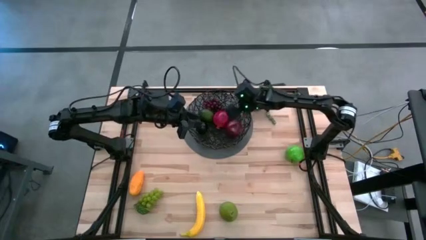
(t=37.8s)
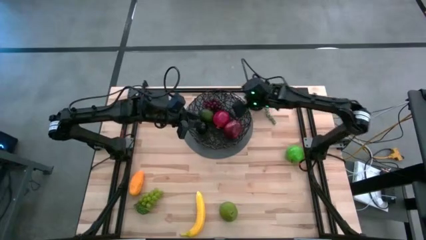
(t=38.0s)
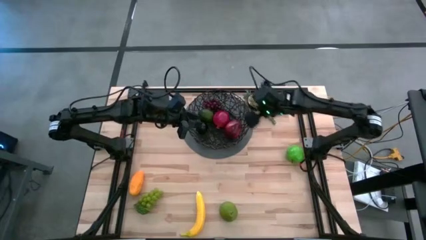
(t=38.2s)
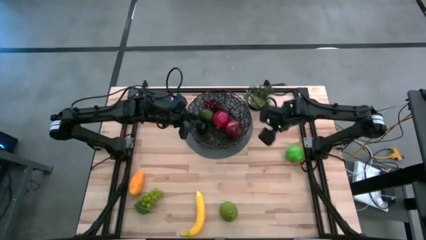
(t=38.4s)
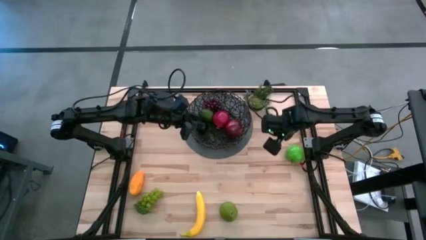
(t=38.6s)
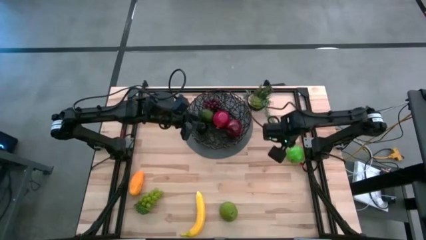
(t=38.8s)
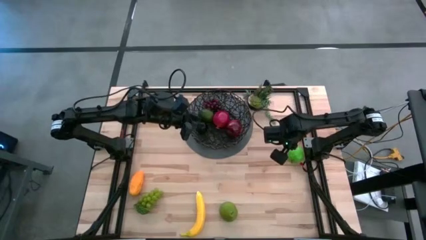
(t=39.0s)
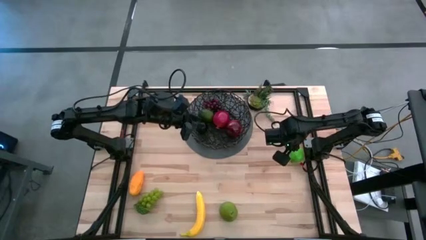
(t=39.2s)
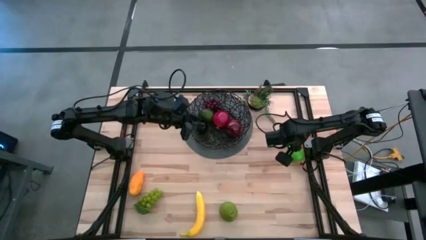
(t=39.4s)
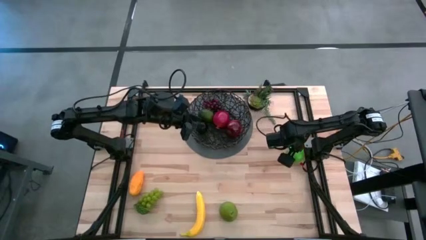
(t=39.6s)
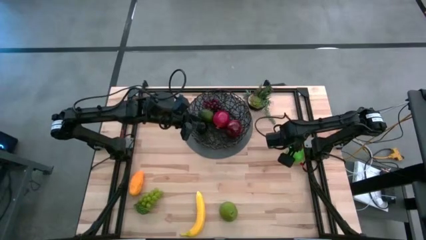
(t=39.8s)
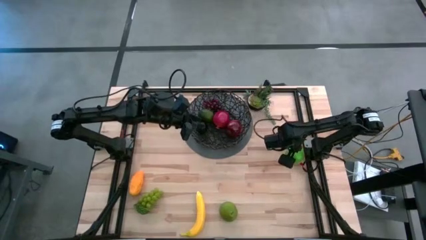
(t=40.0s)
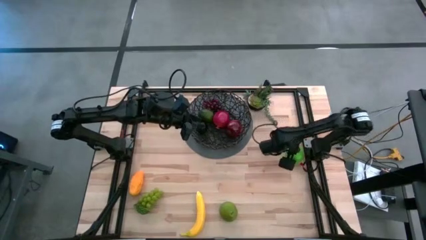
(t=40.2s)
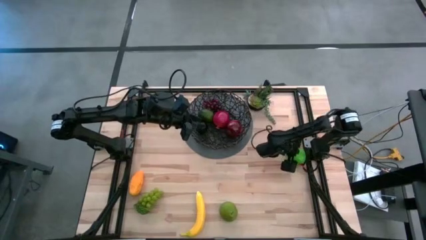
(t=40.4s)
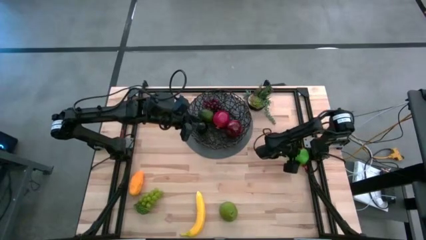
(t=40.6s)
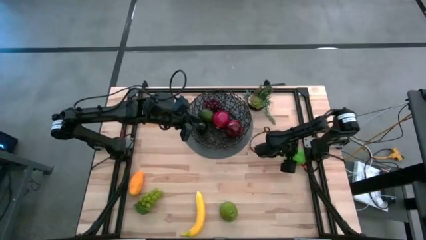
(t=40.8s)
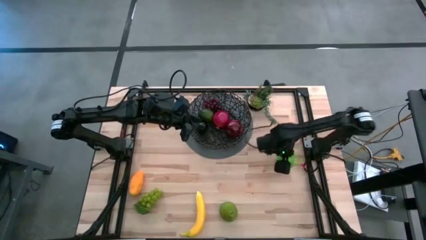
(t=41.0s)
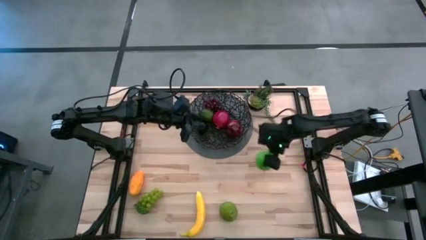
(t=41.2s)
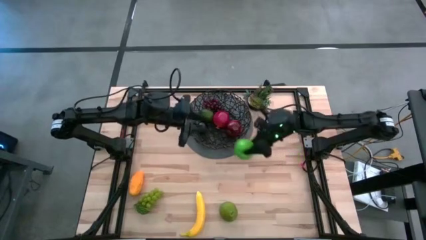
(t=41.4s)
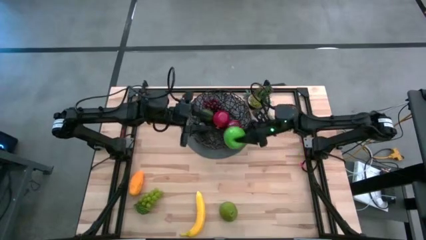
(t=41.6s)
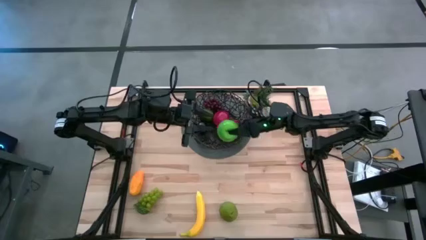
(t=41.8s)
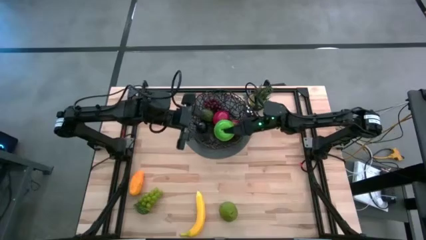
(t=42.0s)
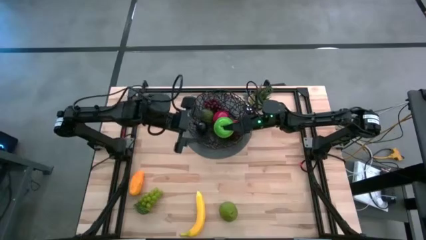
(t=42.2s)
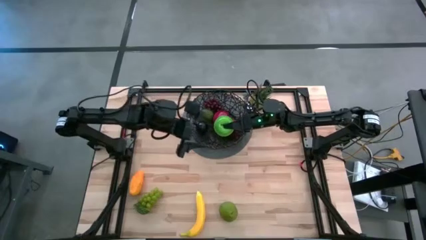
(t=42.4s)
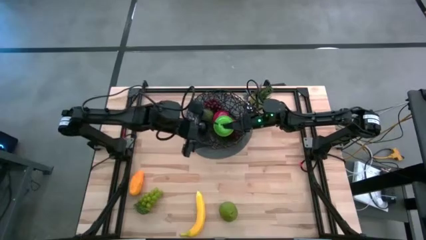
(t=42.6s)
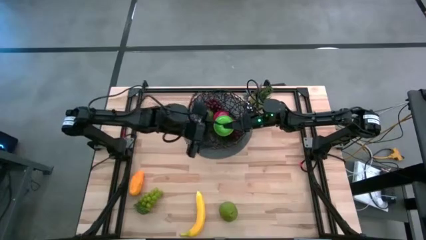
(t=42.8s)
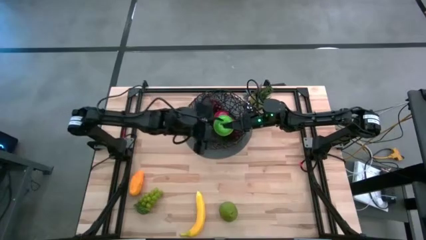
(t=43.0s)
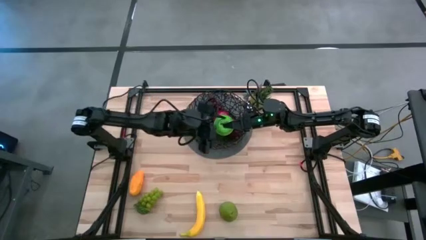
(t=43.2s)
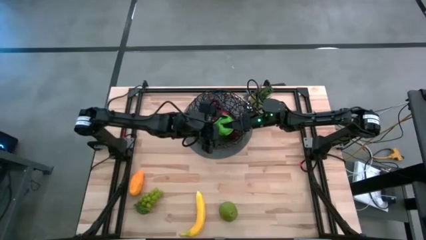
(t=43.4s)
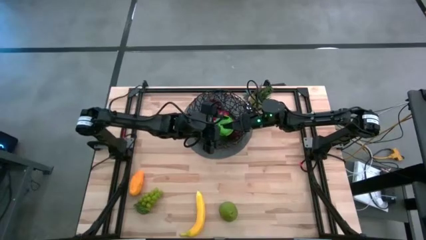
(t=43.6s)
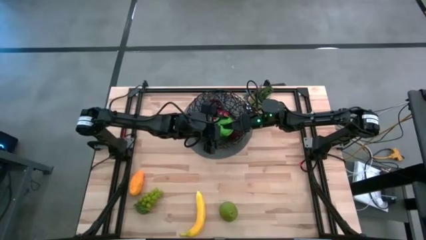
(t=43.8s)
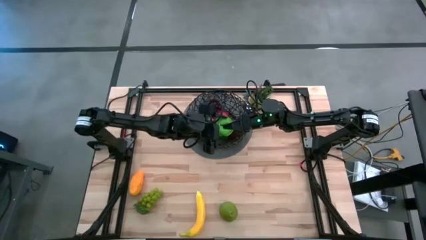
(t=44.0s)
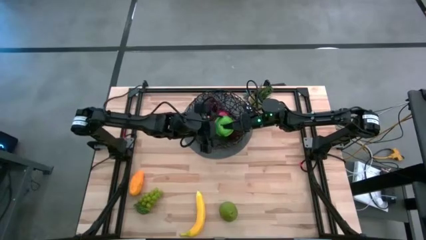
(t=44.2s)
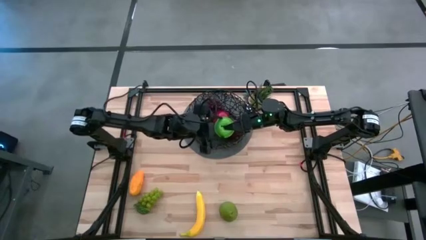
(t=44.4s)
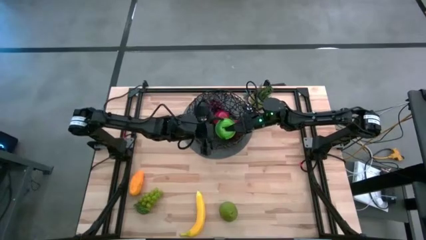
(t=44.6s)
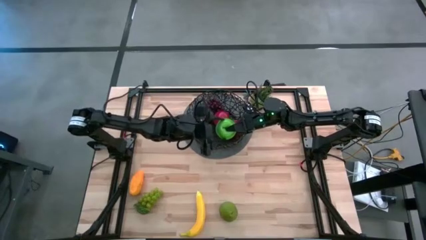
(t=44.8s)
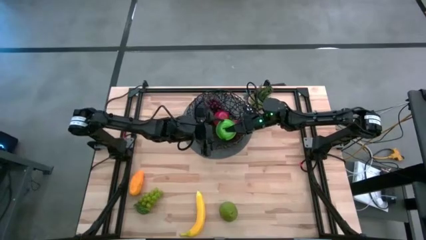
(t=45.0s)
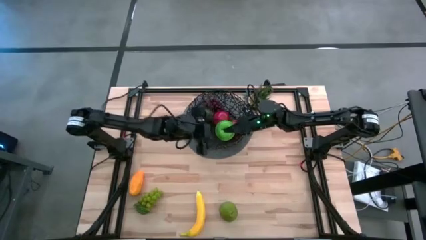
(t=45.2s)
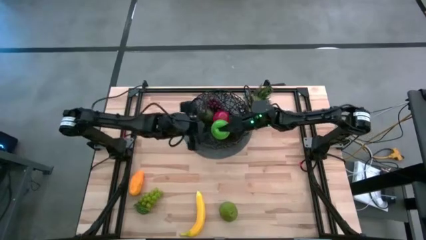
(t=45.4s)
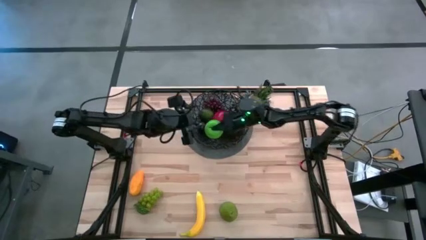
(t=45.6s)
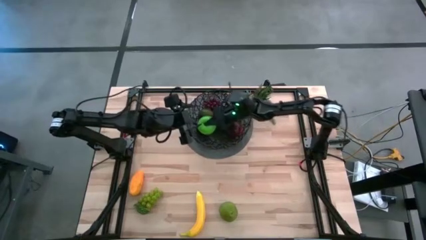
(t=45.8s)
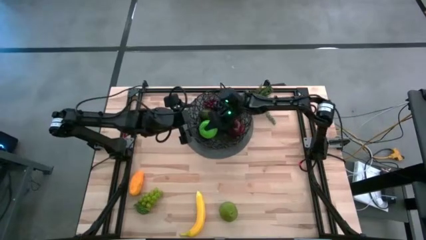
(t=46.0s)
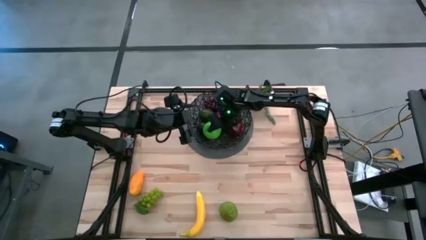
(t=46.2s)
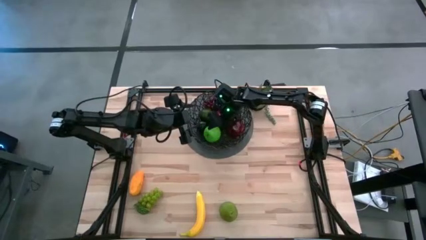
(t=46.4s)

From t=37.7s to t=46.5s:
Task: Build produce basket
Put the green apple into the black basket

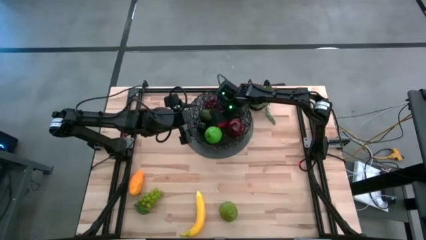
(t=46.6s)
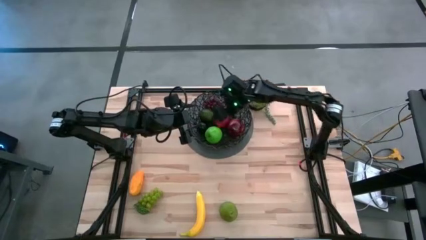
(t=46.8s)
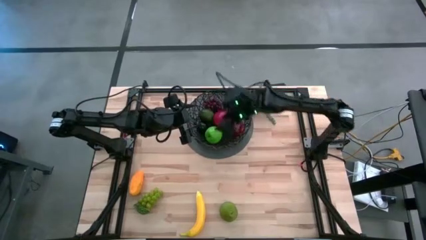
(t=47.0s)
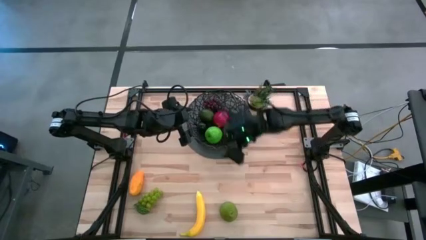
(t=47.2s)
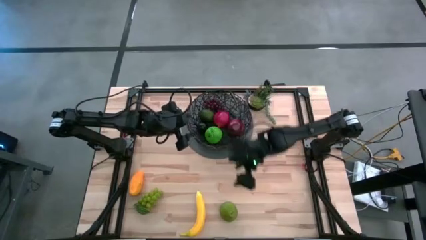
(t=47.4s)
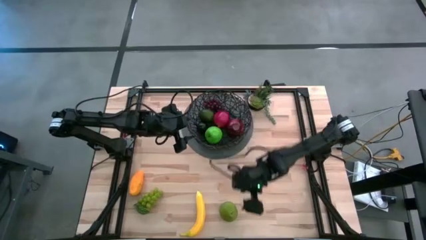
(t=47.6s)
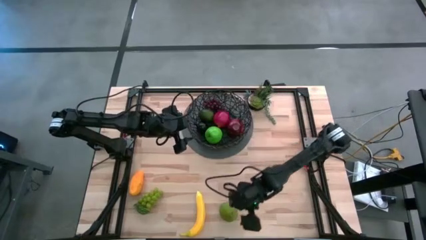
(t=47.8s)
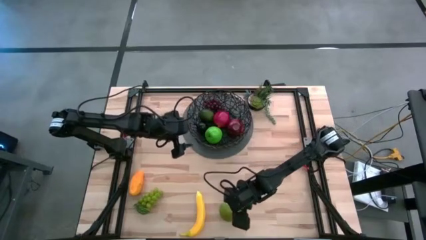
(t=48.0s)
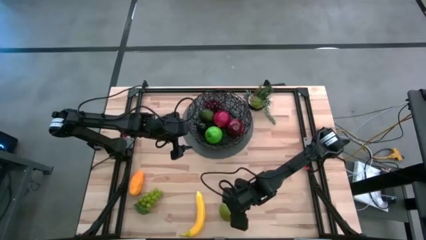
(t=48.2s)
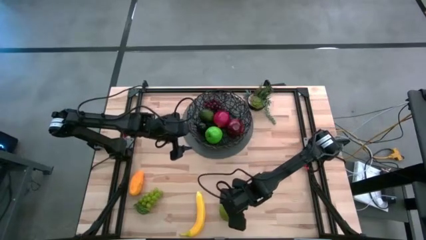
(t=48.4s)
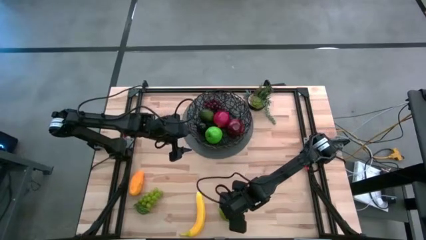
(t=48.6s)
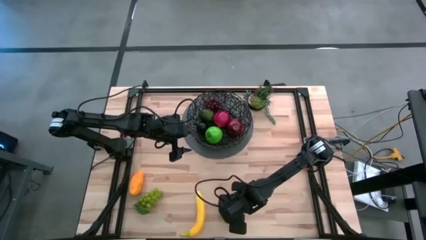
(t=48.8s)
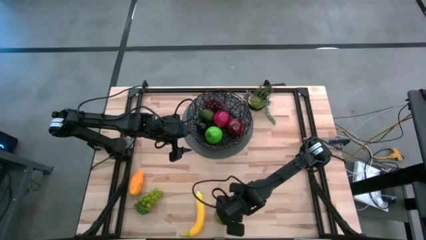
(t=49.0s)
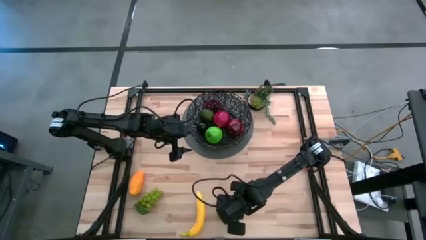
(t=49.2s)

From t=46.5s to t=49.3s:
Put the green pear into the black basket

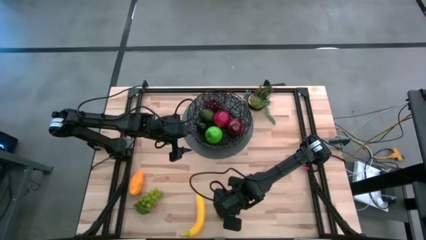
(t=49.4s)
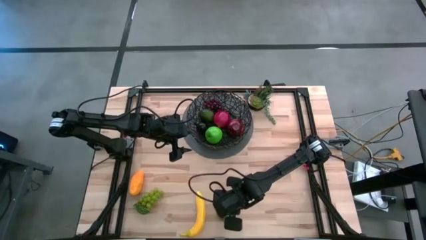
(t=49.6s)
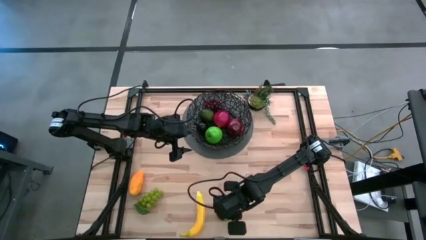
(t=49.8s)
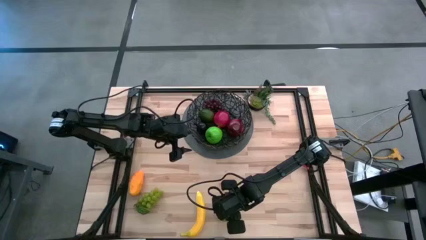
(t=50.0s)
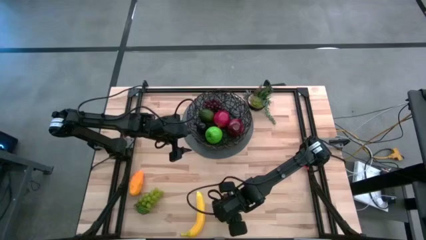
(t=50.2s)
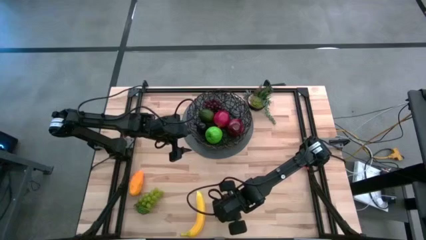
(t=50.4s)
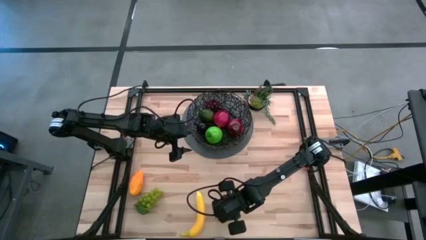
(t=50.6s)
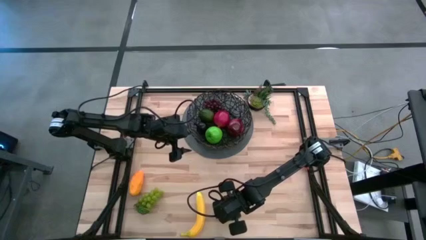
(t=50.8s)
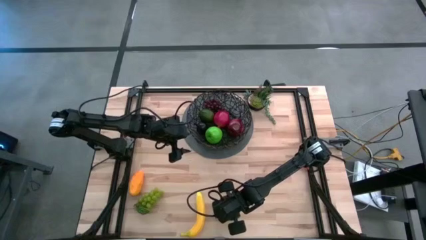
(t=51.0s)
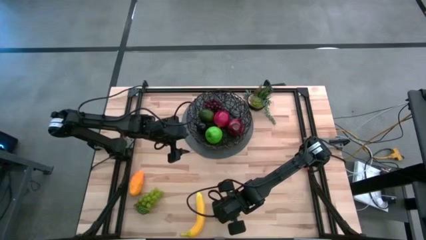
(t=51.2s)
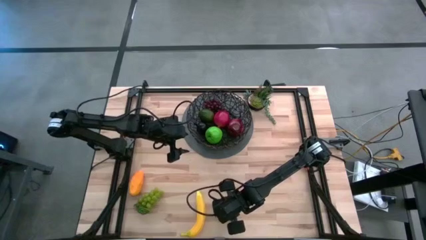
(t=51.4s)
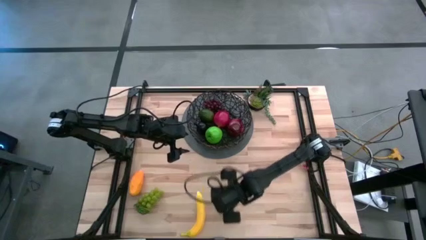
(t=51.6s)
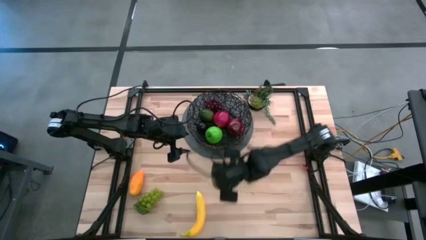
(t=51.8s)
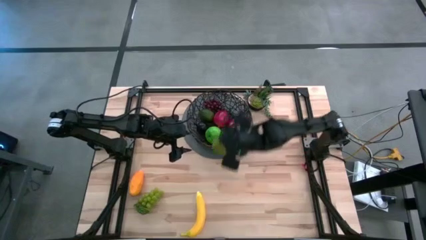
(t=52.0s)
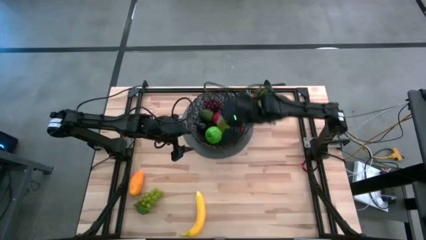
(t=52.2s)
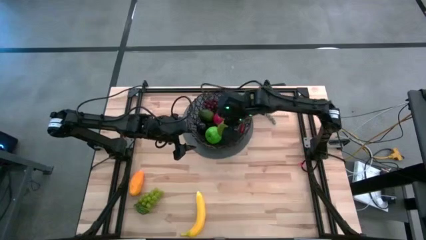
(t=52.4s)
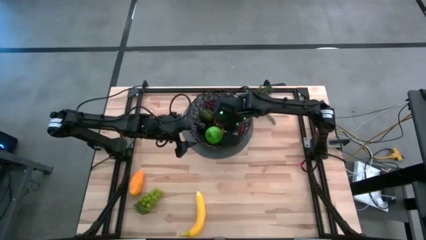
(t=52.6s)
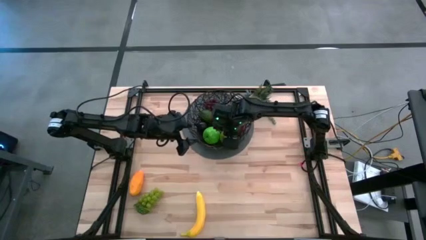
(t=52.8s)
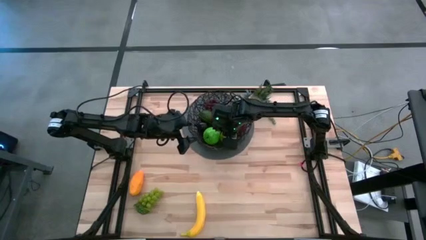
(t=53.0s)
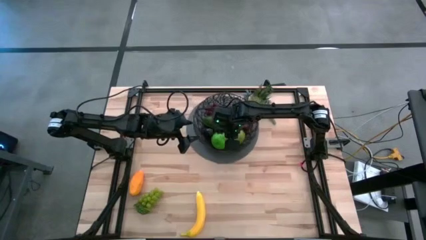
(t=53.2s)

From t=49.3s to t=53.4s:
Put the green pear into the black basket
